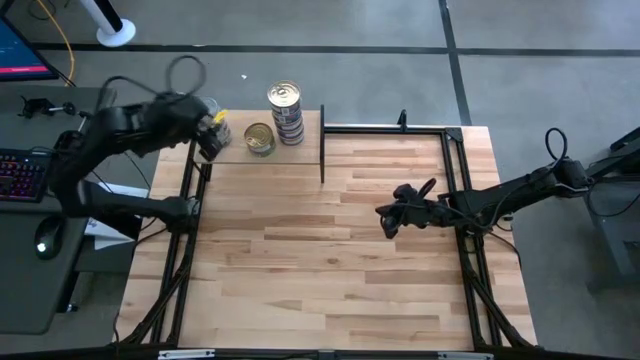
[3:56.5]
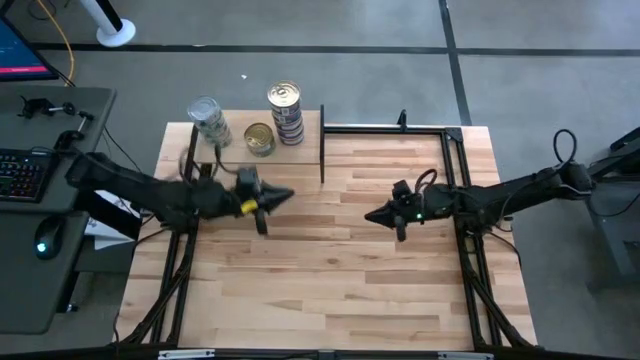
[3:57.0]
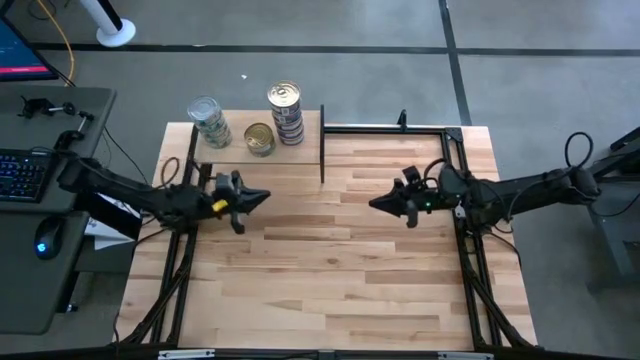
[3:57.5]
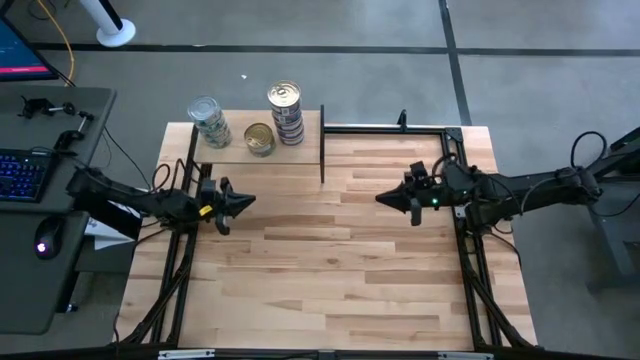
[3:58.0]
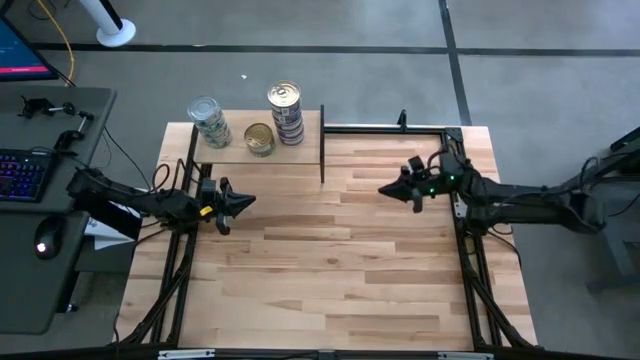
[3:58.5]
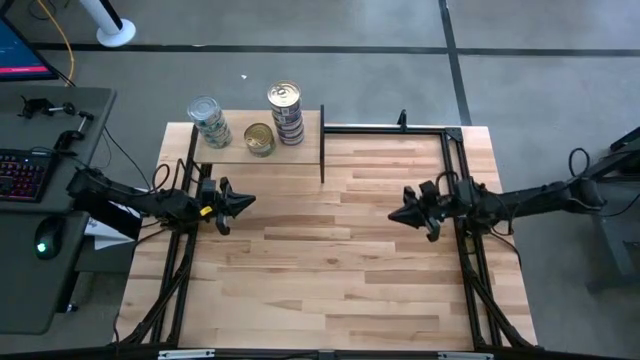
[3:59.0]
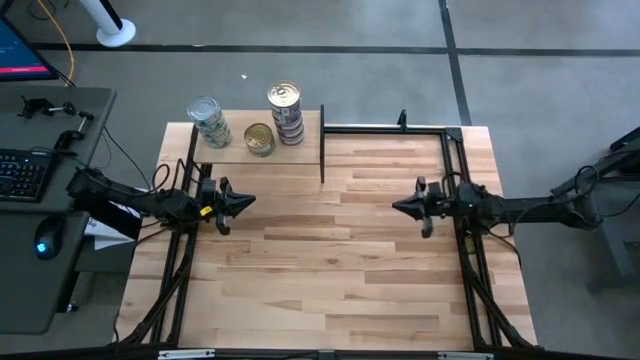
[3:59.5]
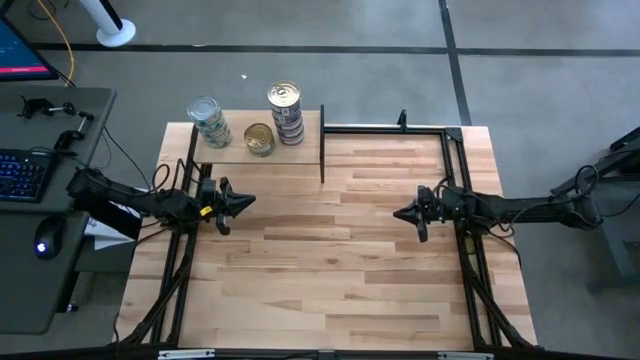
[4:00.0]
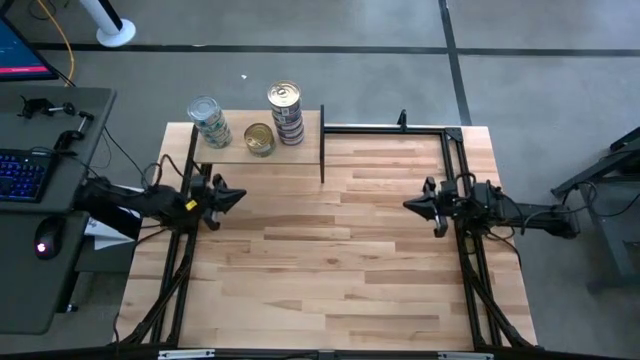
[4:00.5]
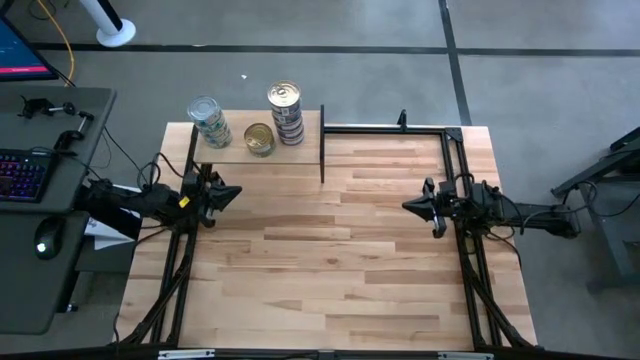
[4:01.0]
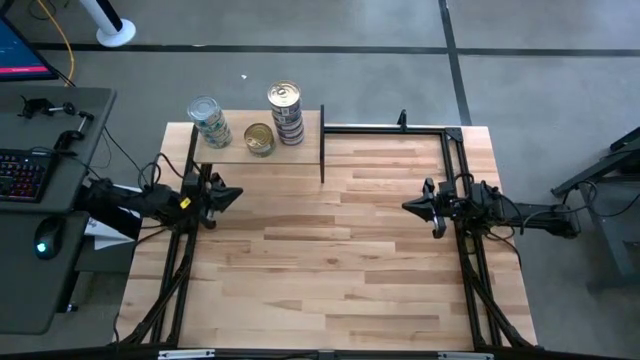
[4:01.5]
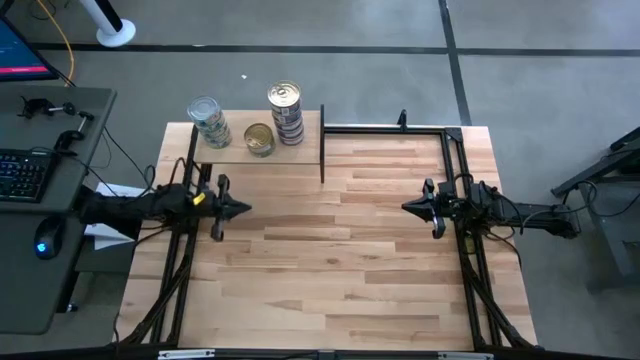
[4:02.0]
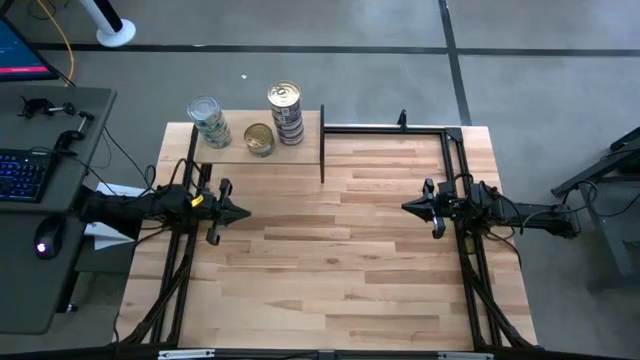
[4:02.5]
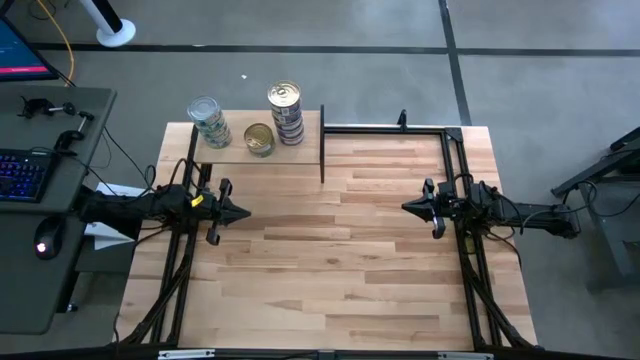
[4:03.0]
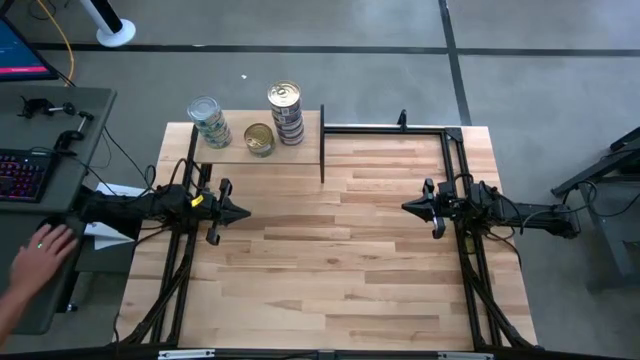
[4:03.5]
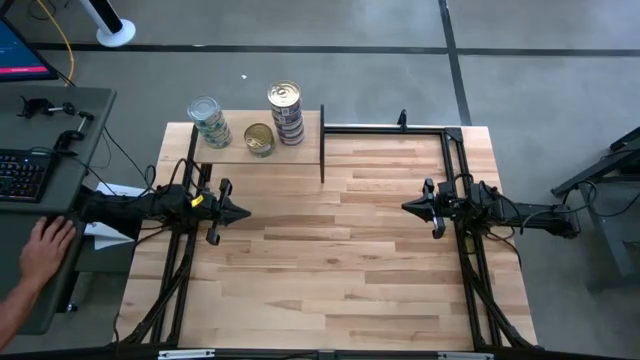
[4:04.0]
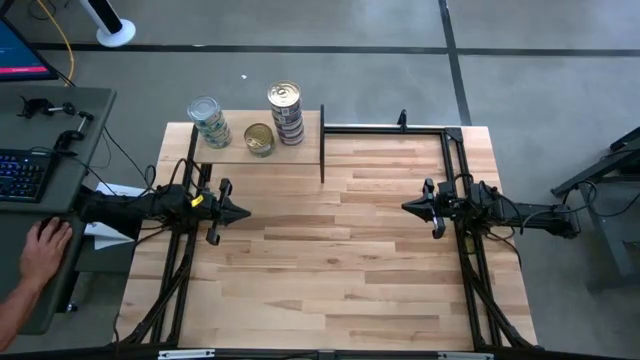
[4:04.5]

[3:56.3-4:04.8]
Task: Stack canned seafood by type on shelf
Return to Home Position

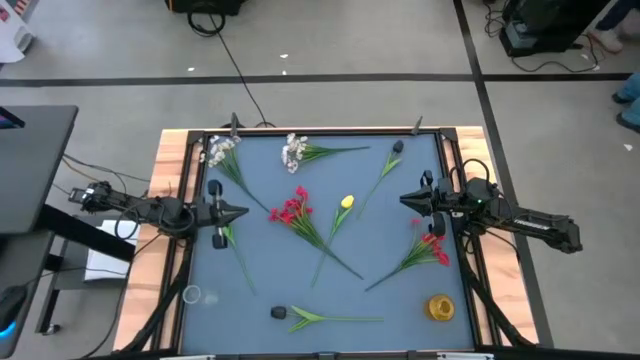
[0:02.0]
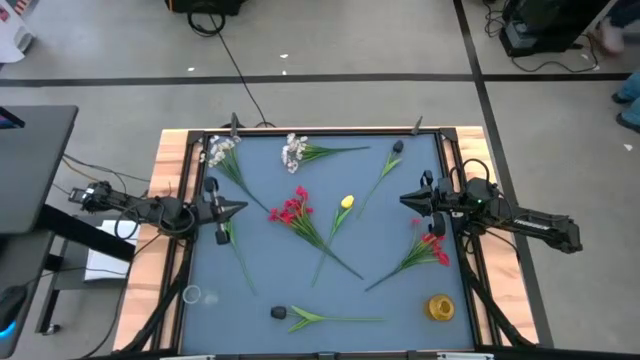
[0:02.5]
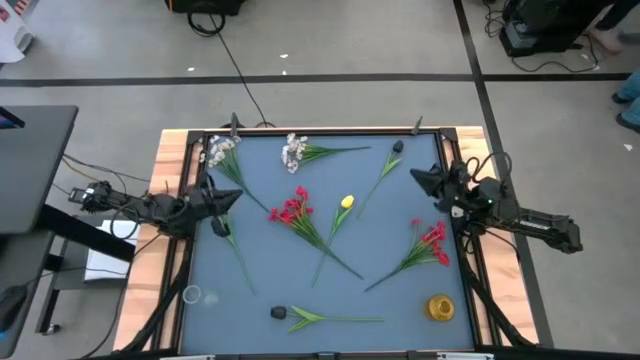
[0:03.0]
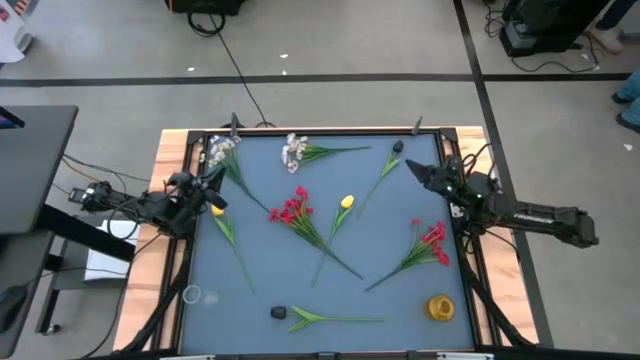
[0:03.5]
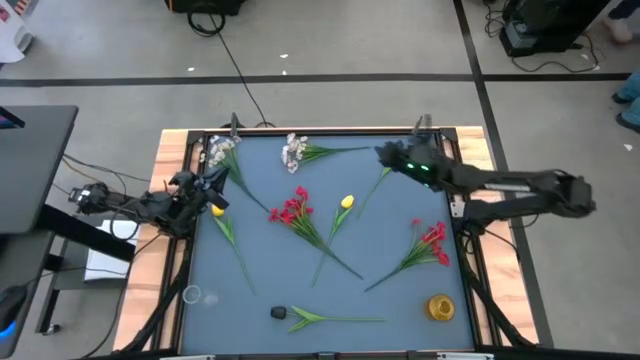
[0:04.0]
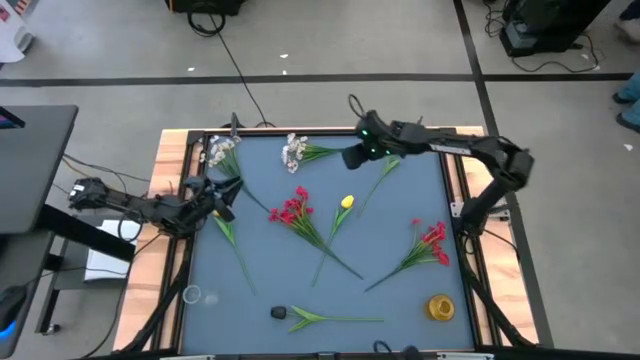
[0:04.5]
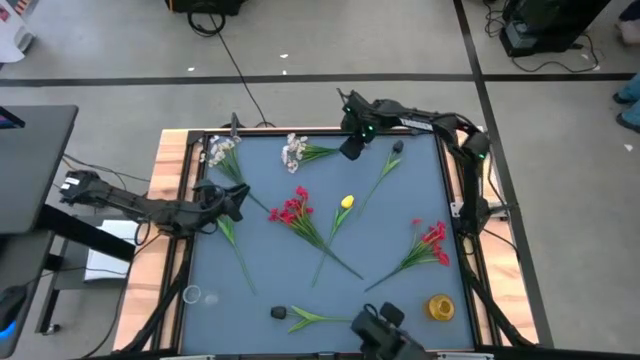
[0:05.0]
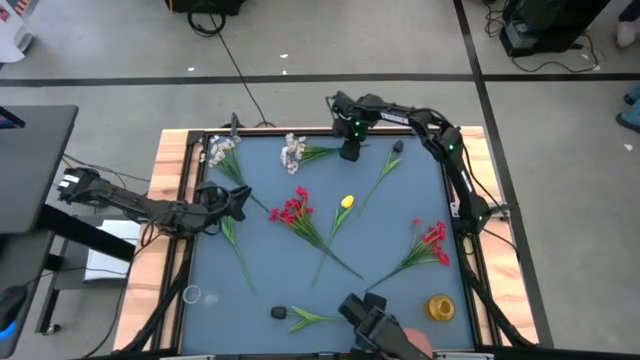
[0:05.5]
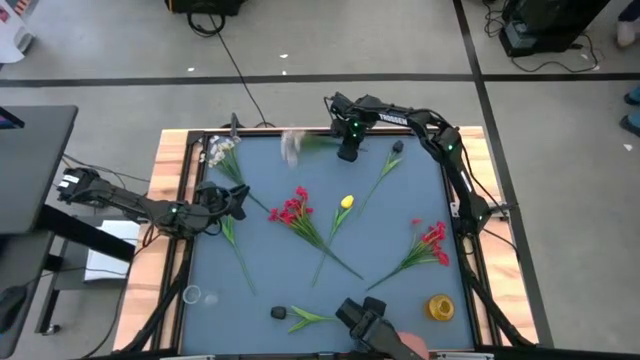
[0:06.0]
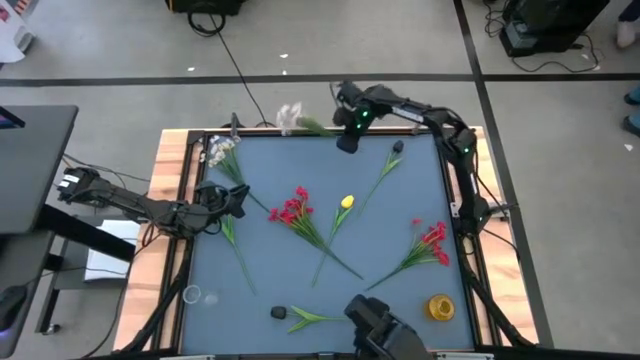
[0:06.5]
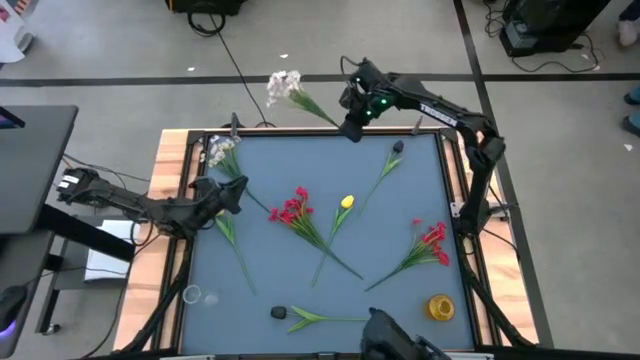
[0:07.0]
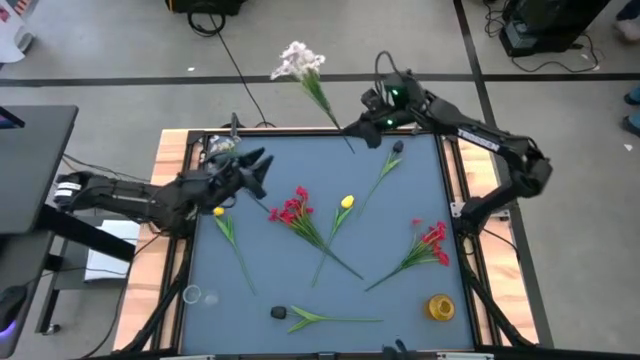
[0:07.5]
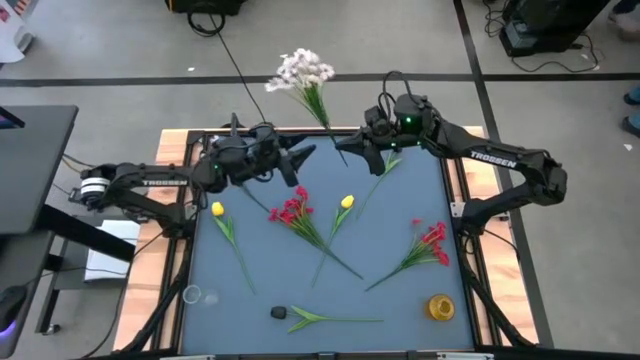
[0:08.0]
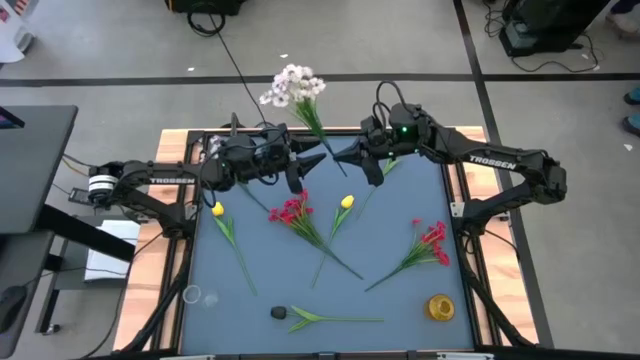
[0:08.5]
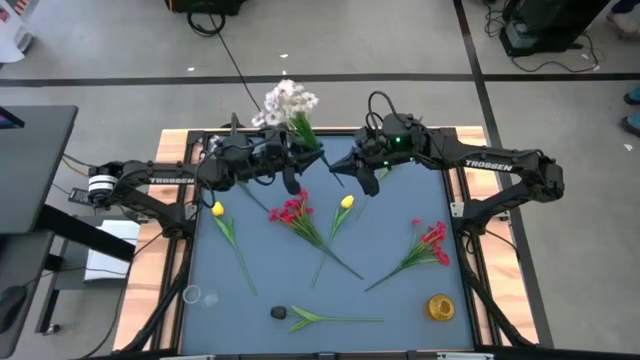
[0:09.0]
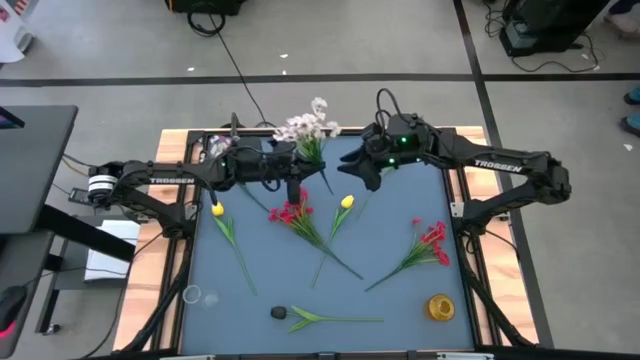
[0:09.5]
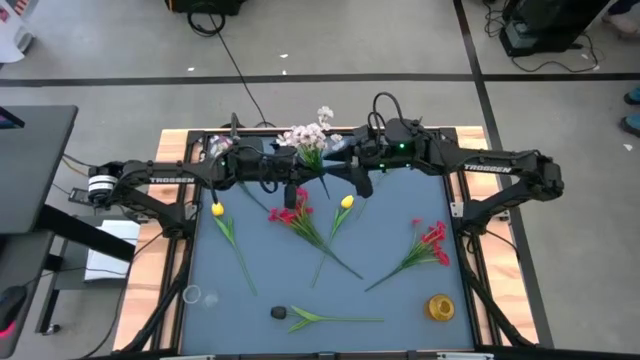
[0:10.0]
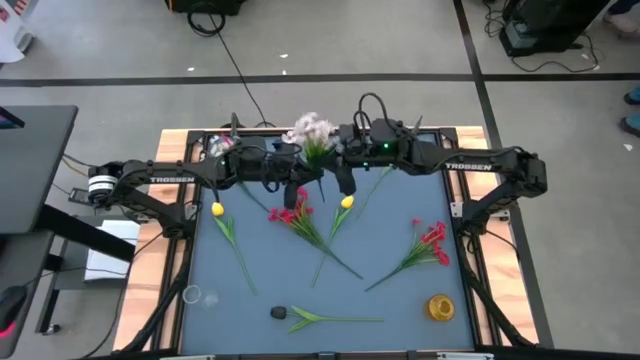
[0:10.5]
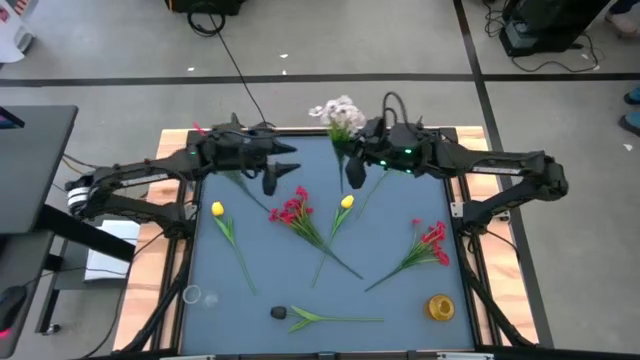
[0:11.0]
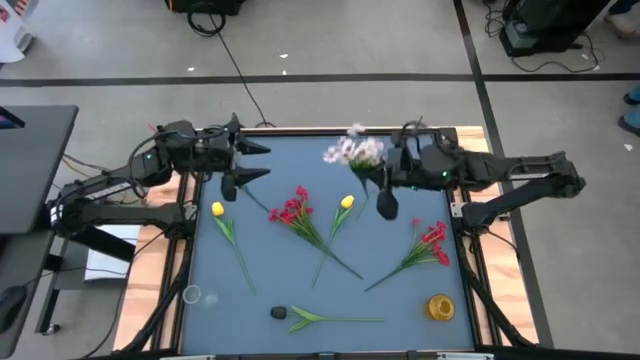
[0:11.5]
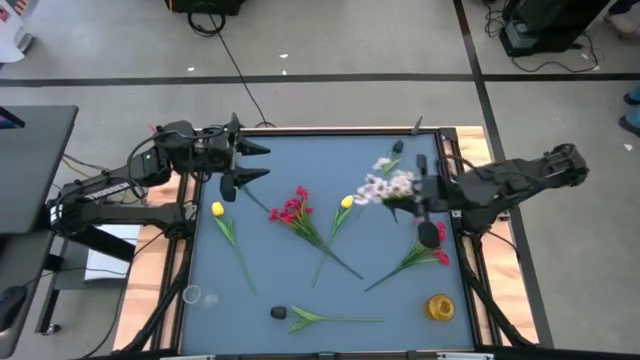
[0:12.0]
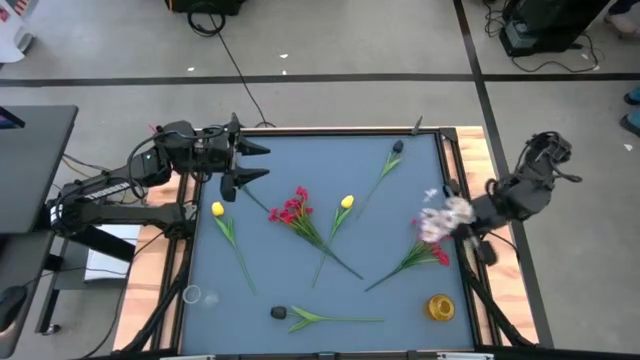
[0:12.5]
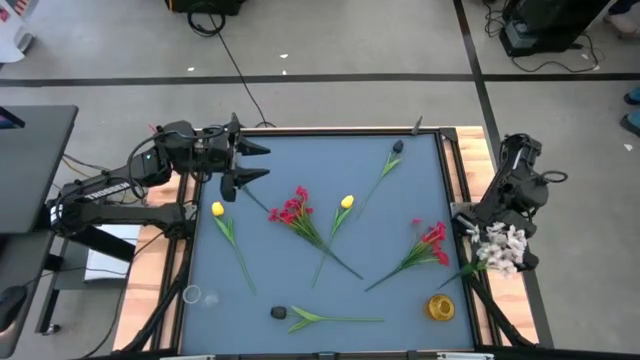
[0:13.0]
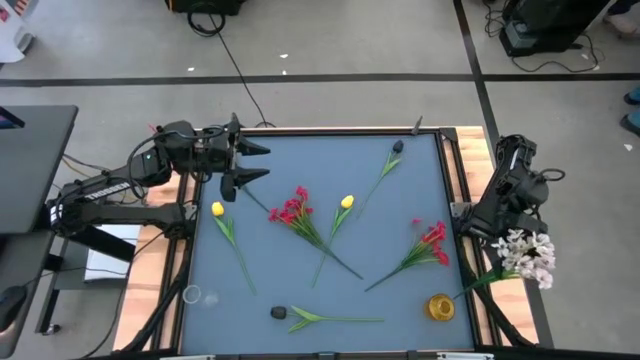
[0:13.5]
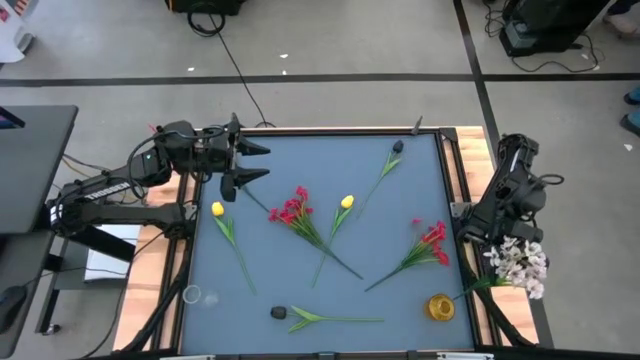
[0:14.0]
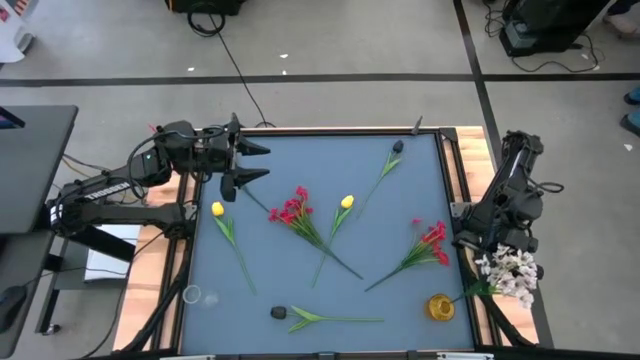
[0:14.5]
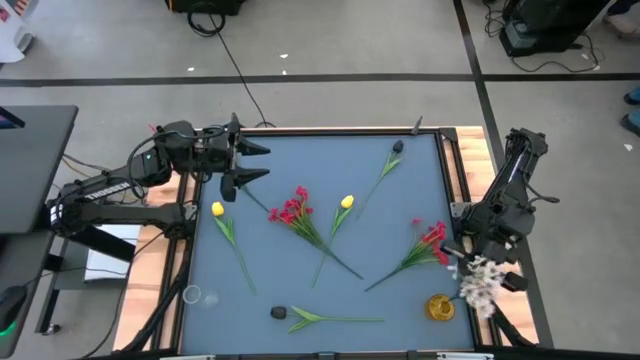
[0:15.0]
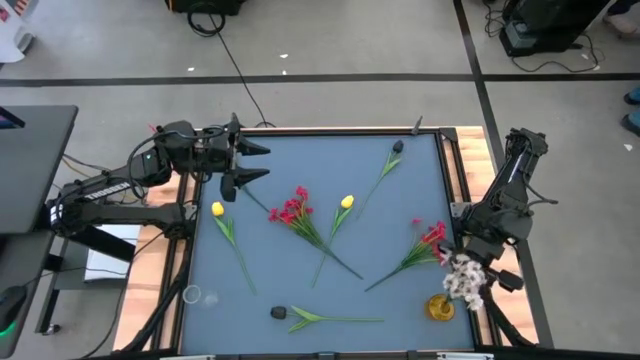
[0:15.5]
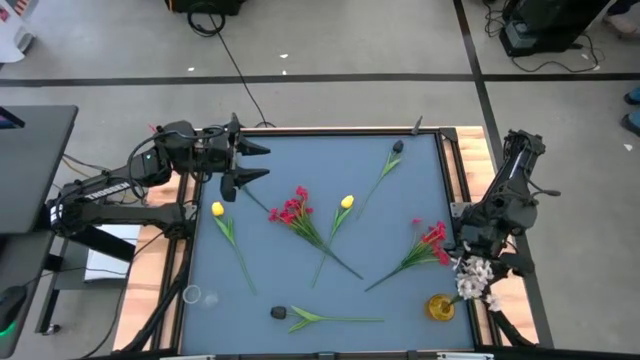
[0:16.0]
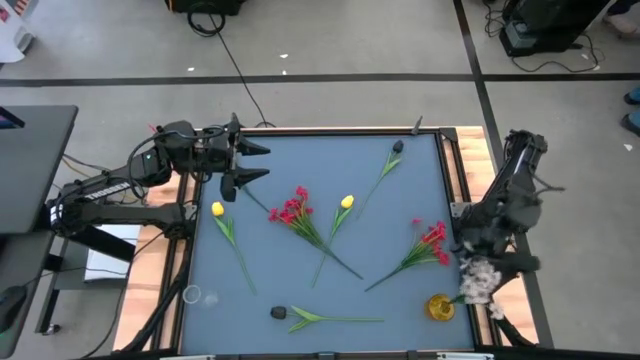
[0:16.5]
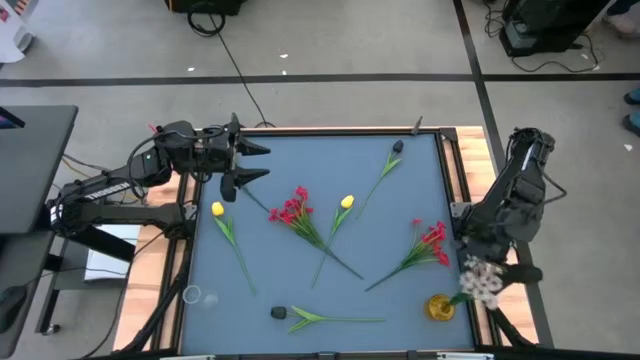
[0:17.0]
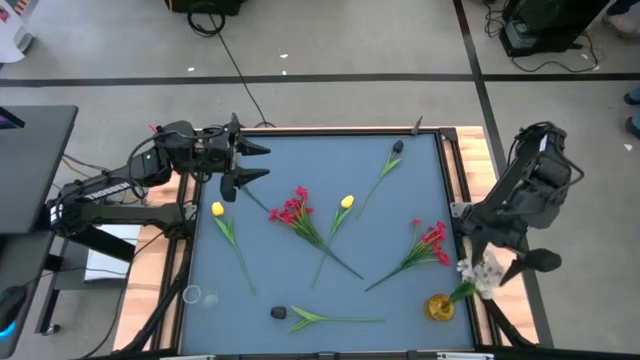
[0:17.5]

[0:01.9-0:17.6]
Task: Sort flowers into vase by color
Put the right white flower into the yellow flower vase
